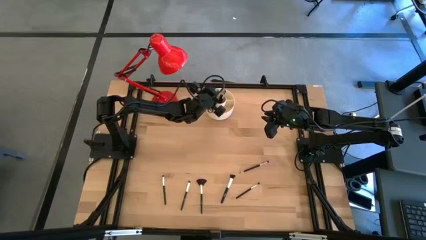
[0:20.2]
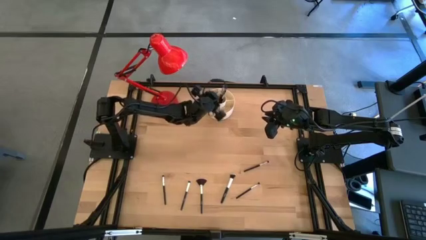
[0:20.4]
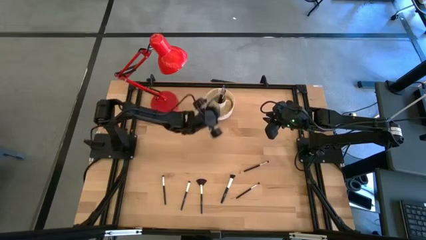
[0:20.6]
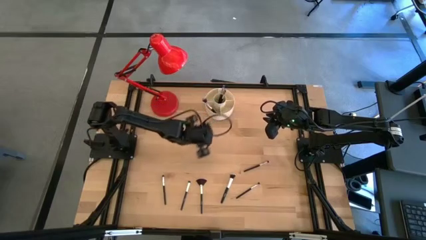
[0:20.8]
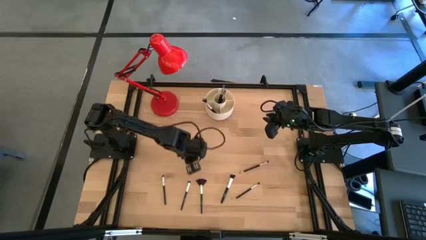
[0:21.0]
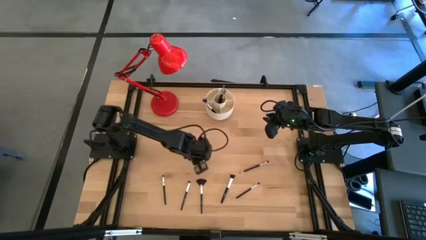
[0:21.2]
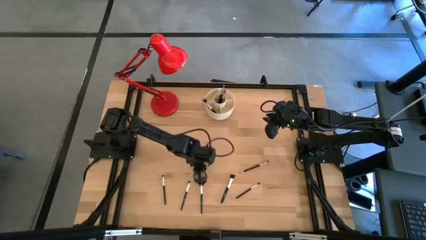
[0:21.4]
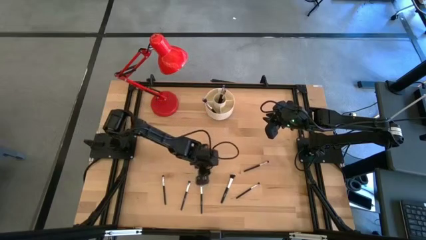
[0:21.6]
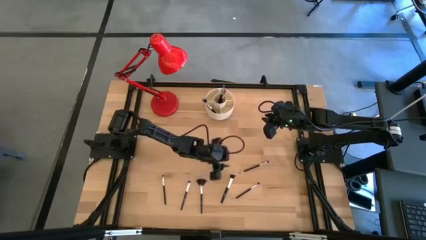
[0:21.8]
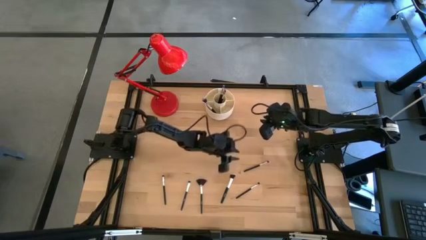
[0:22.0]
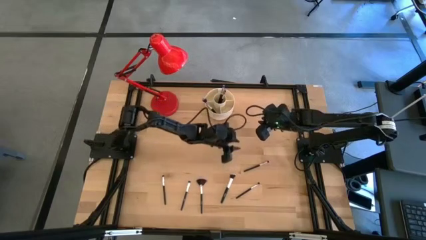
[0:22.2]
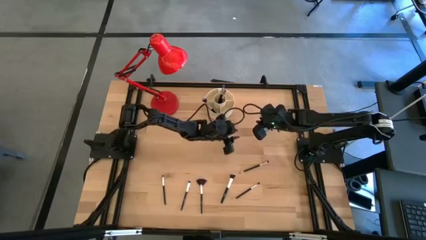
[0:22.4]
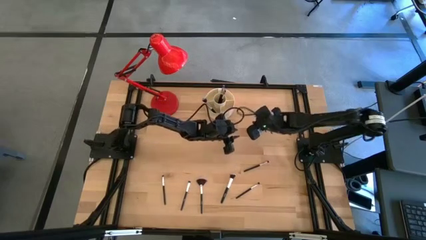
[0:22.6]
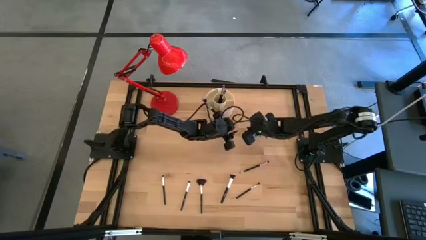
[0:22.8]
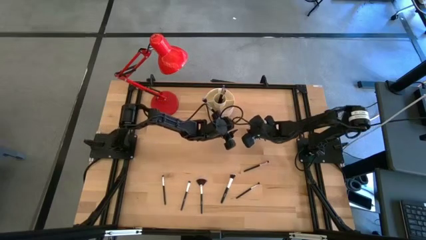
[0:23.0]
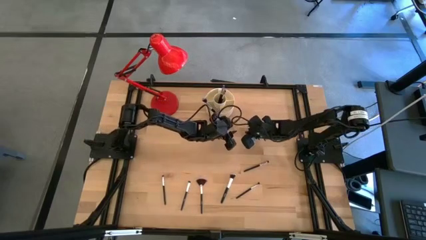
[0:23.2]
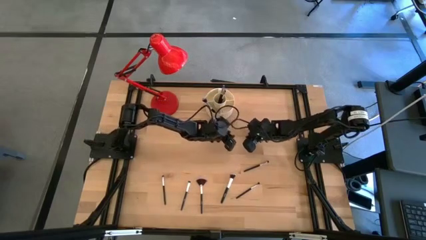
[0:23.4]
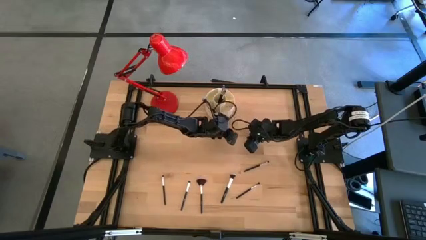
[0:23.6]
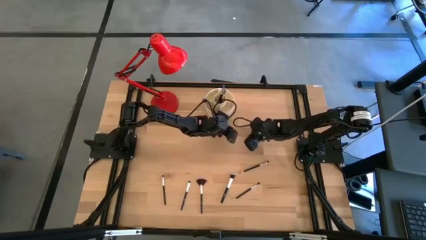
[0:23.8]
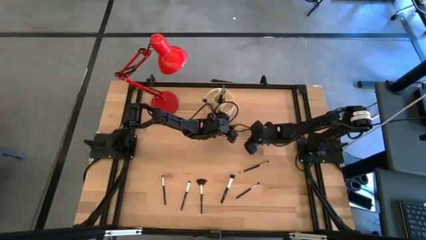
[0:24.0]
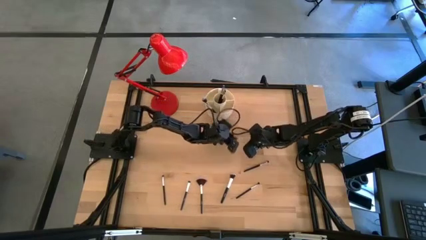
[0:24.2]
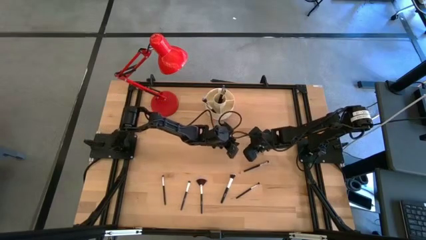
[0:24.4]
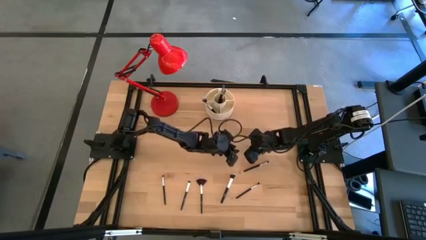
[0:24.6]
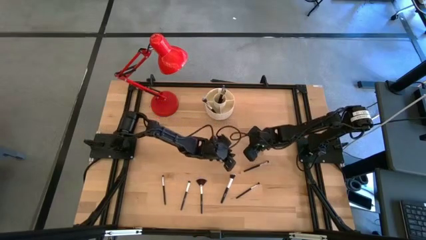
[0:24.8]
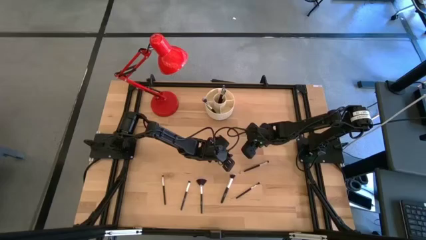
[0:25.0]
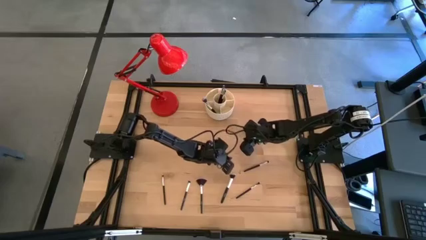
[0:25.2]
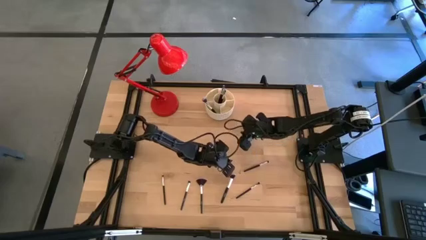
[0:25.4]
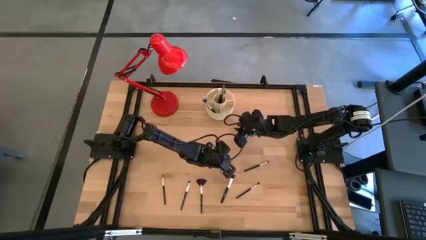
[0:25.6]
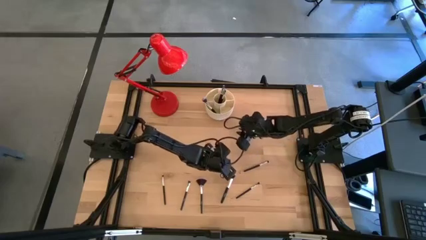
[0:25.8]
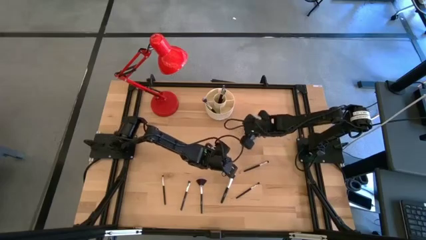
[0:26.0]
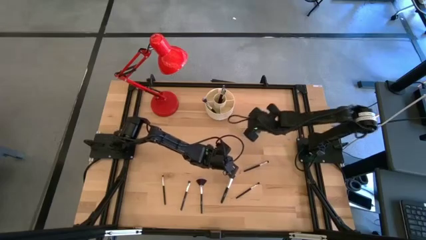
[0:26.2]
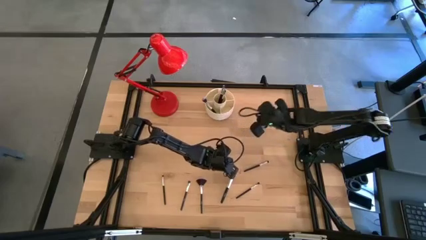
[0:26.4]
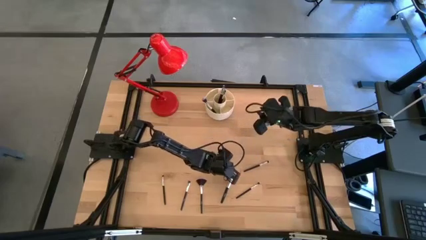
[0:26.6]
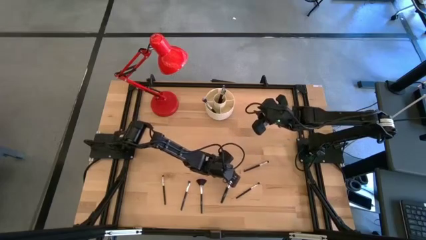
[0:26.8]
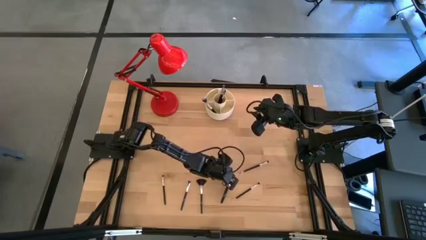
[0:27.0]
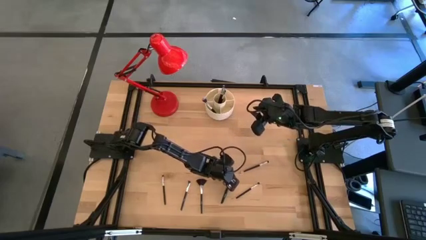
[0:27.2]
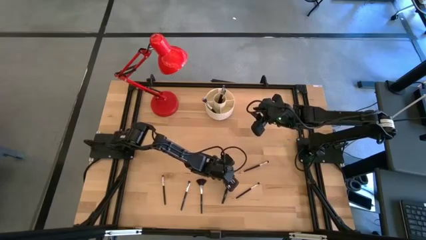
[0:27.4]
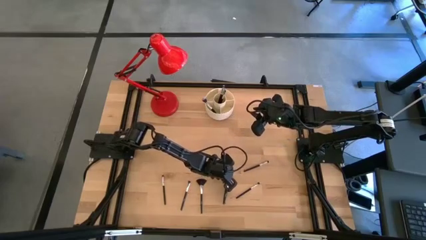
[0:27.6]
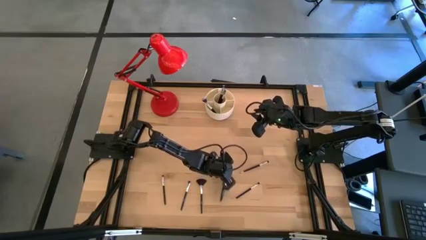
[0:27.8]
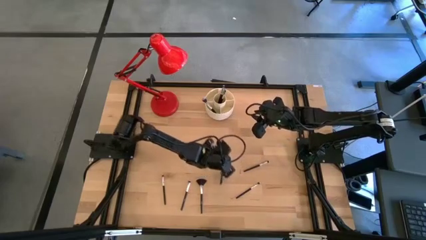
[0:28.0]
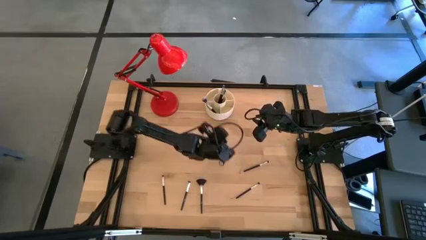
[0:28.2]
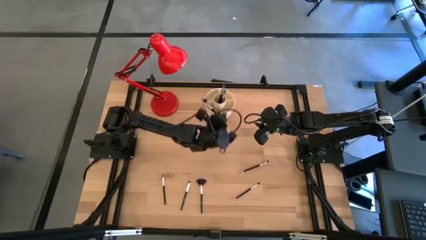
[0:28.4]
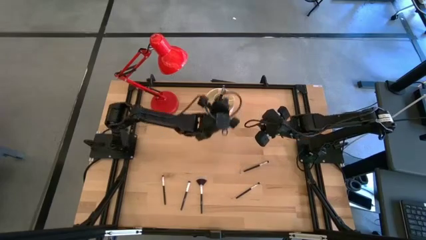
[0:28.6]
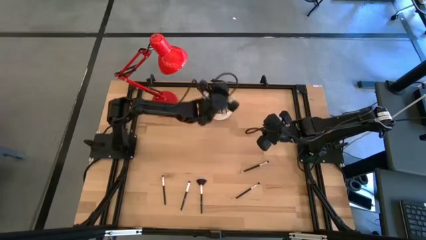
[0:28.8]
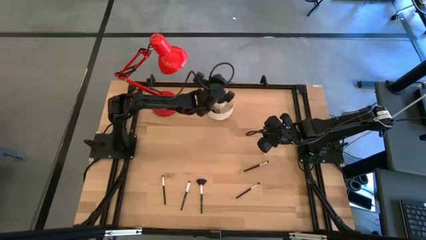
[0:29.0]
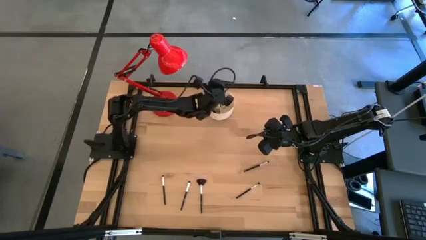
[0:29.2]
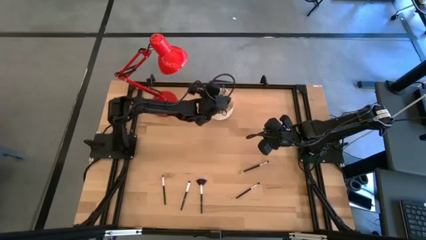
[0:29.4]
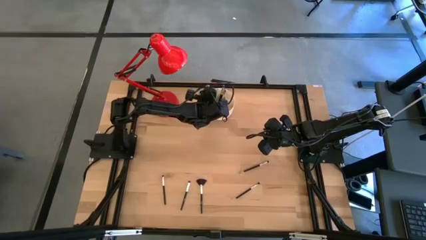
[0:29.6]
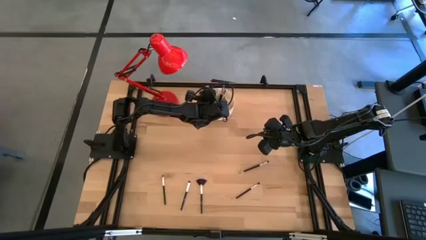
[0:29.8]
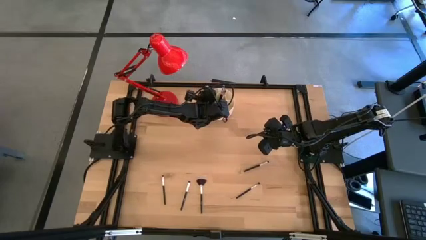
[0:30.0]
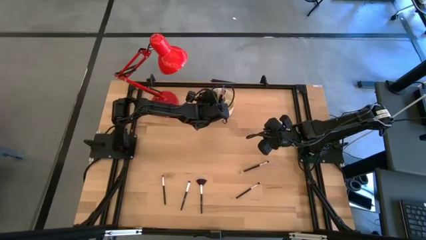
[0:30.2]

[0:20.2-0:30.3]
Task: Put items in baskets/containers
Put the black powder brush into the white organizer

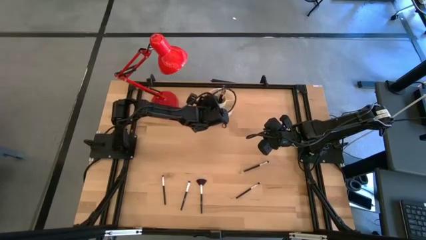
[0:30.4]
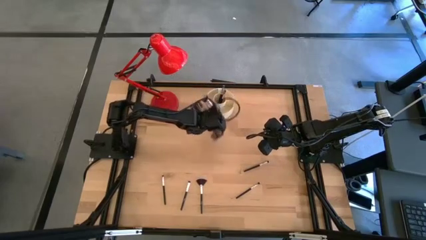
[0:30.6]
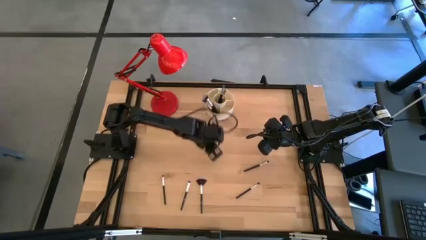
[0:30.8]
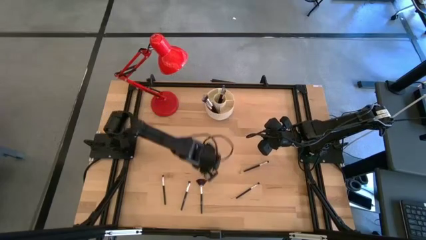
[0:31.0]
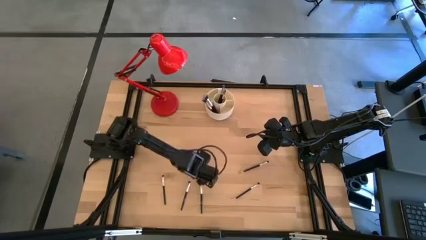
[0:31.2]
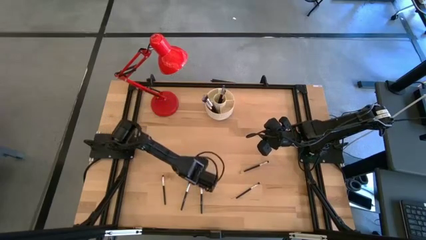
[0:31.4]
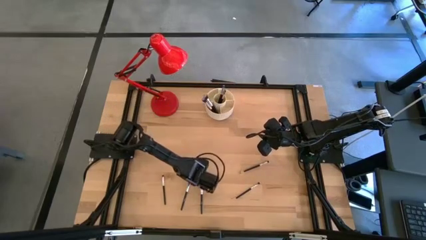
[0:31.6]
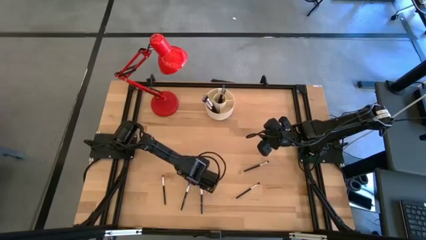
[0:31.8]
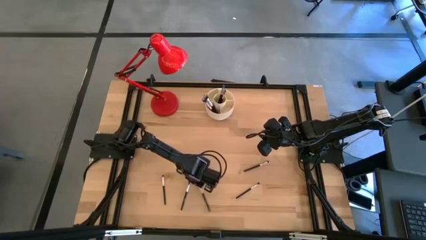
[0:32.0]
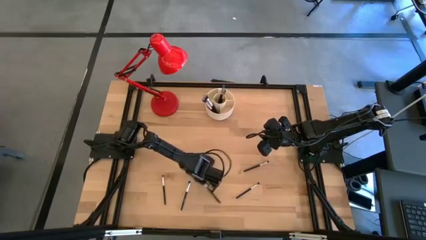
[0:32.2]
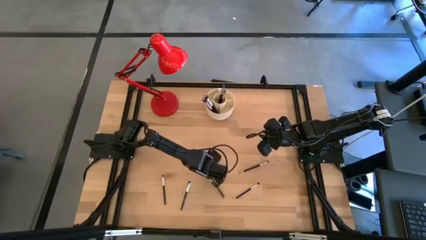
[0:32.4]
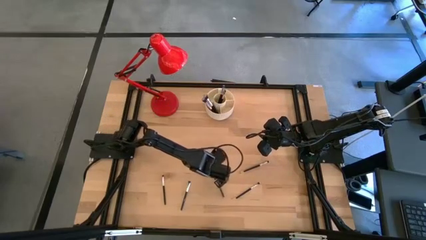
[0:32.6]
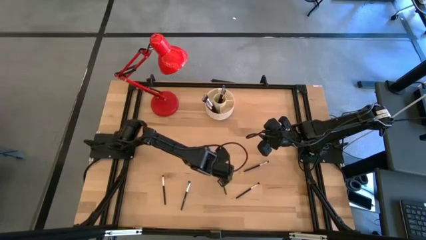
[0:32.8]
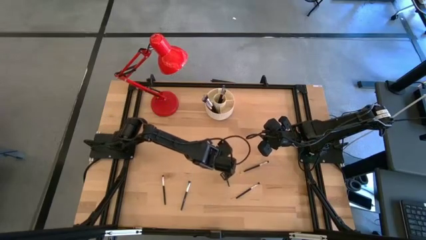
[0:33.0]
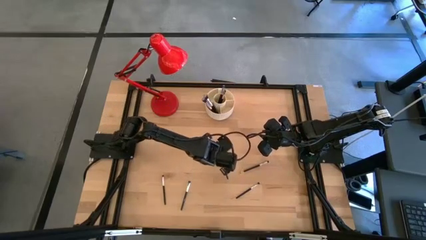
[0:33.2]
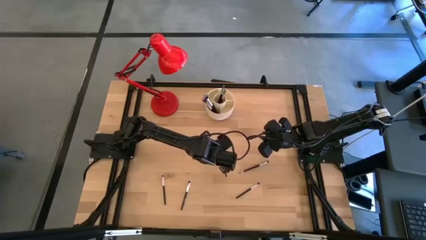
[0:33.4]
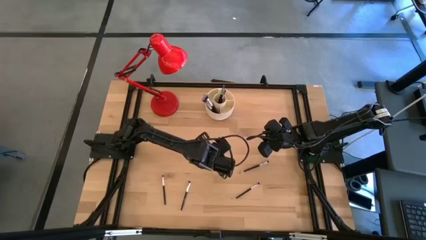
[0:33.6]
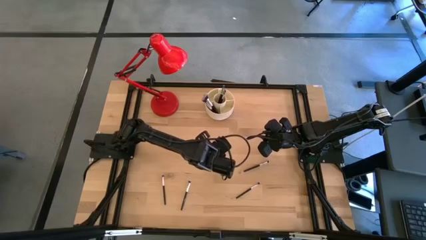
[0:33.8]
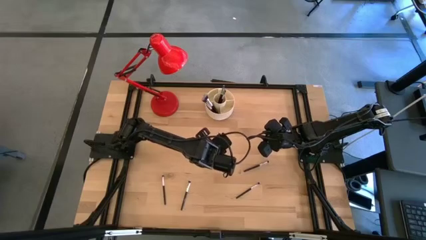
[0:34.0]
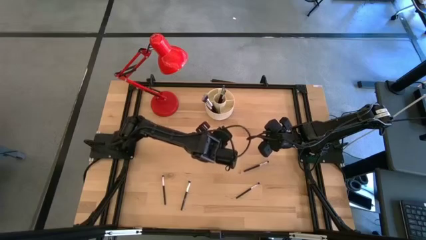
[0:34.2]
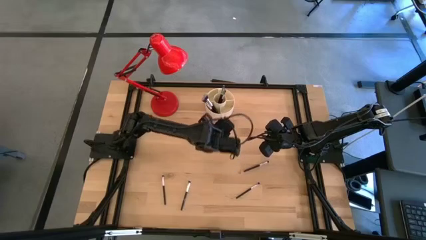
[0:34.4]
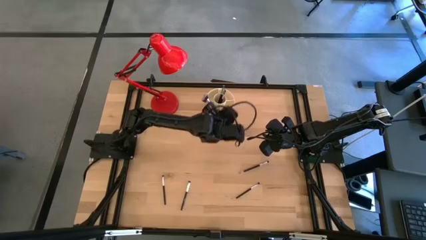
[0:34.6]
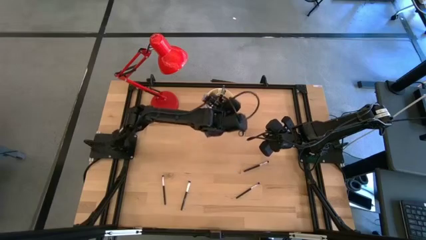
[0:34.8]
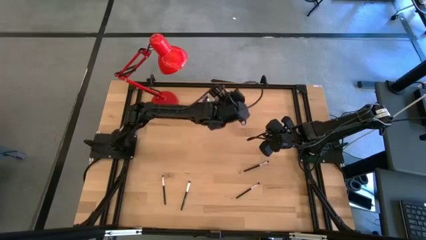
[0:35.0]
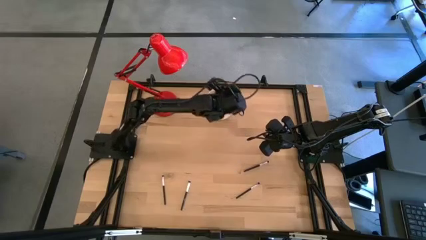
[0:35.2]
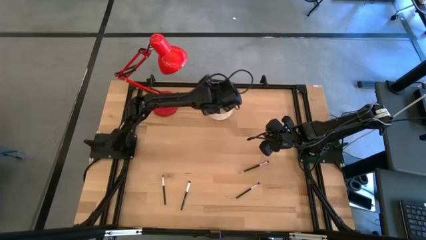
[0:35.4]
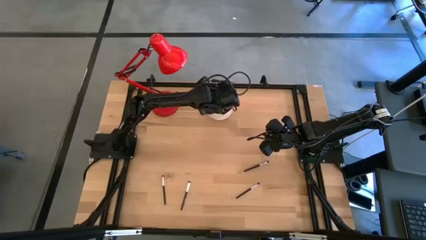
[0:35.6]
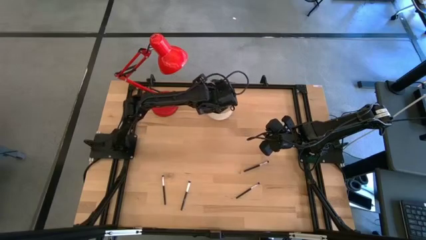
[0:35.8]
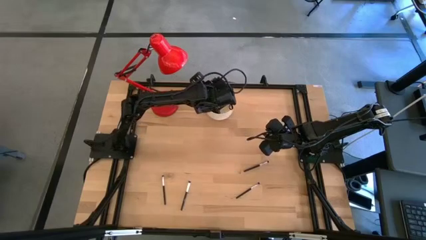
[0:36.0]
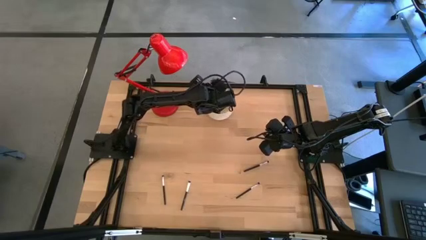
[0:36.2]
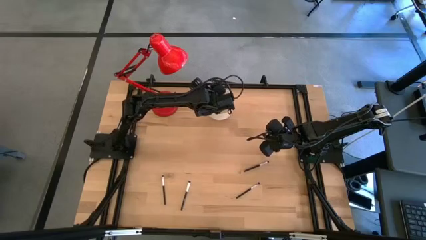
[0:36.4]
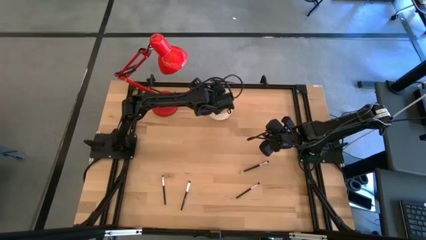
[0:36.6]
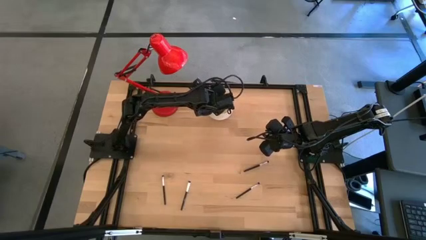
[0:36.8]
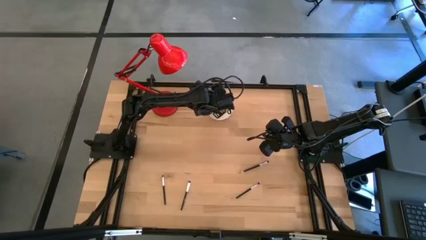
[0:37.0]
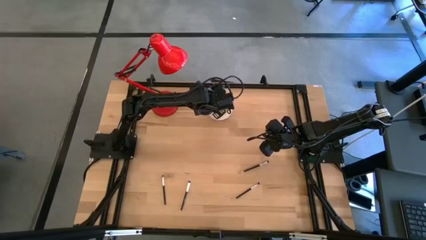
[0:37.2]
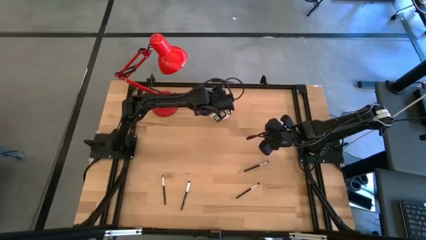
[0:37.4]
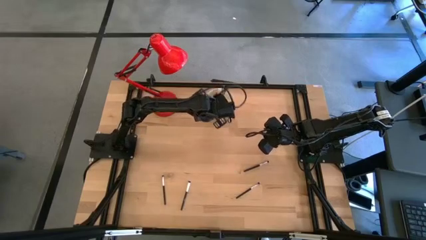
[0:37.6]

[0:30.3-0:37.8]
Put the black highlighter brush into the white organizer
